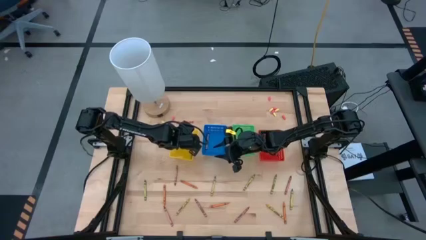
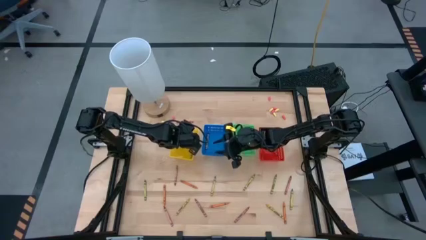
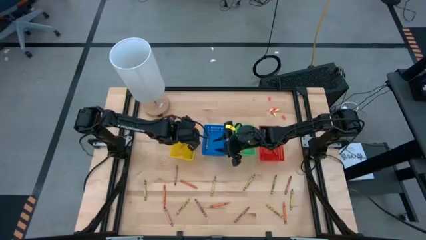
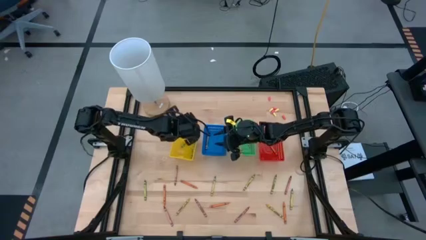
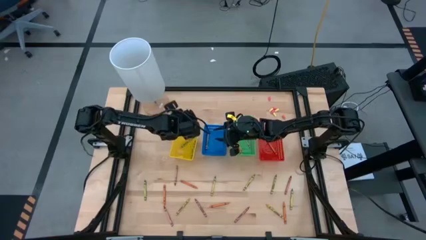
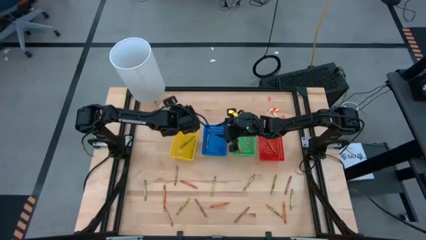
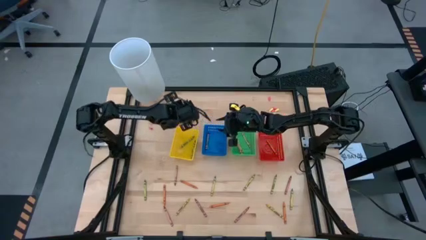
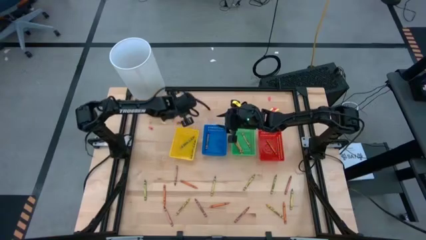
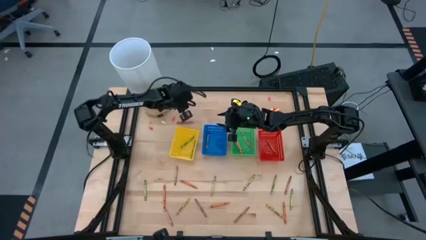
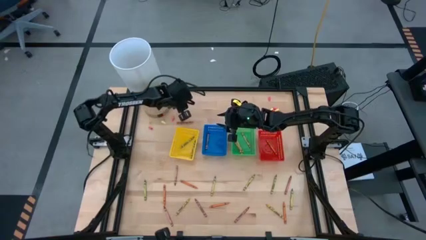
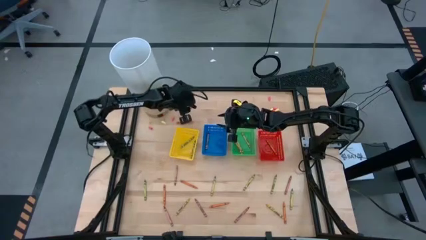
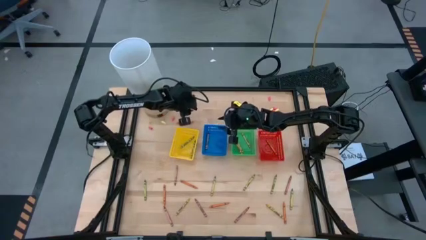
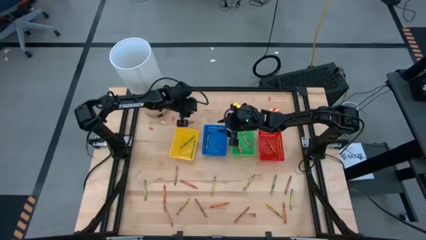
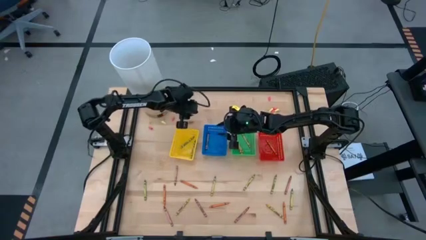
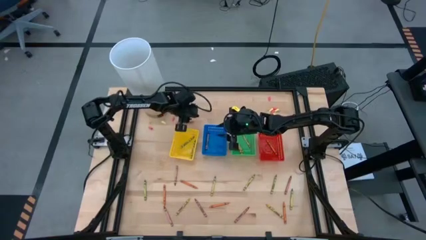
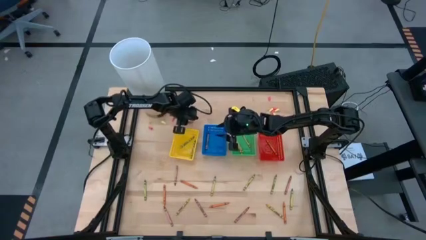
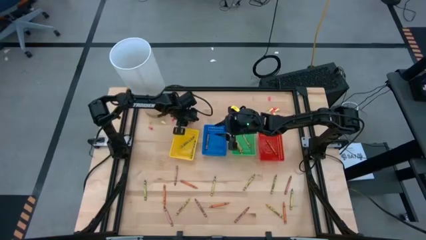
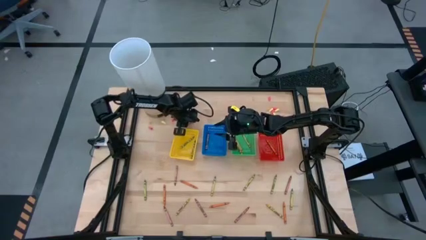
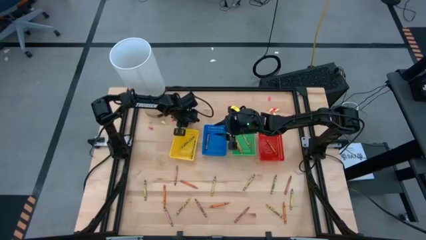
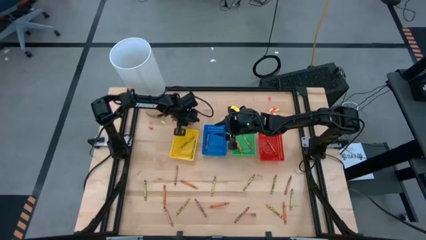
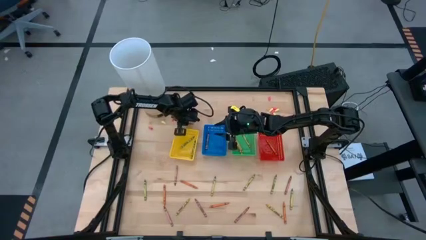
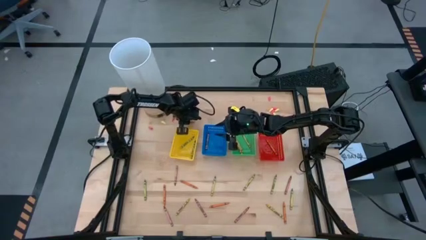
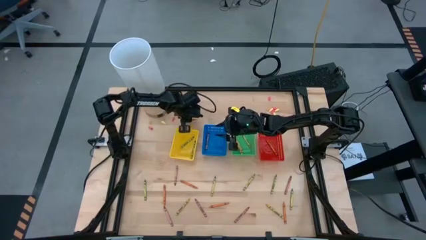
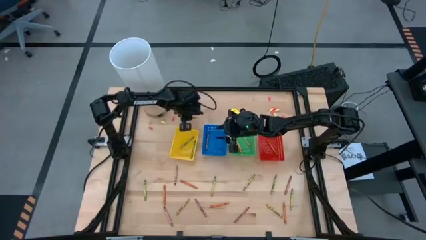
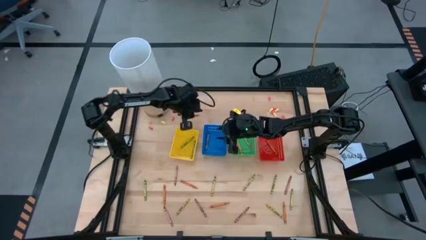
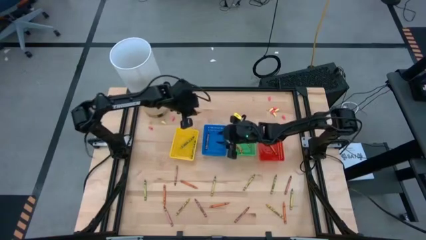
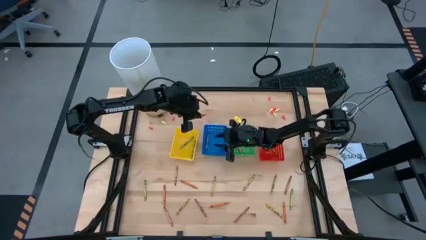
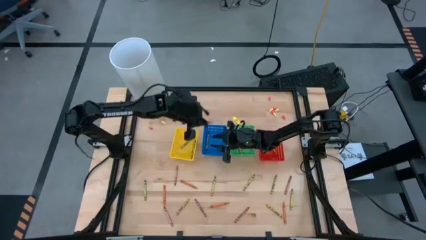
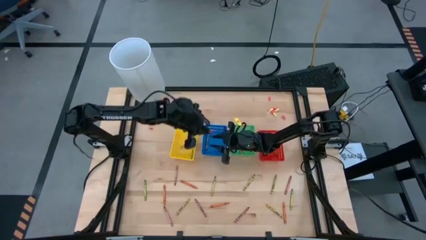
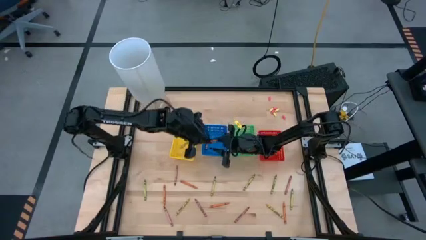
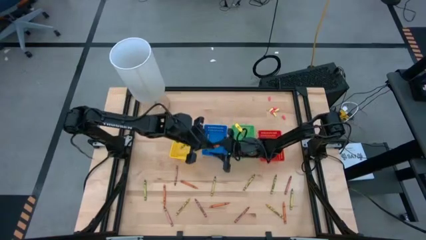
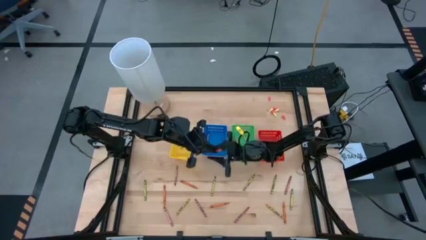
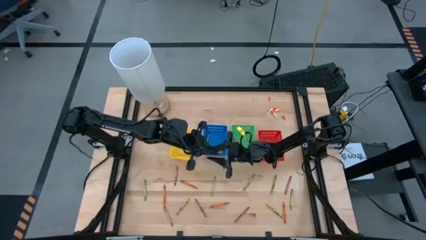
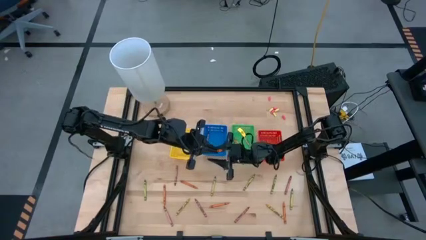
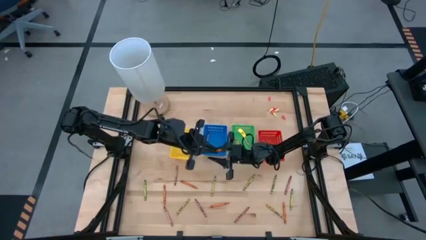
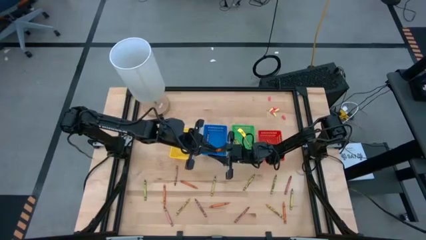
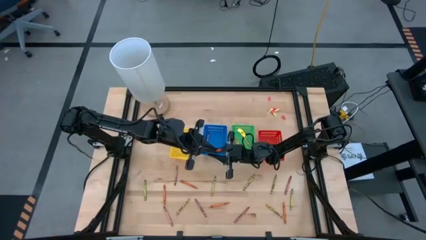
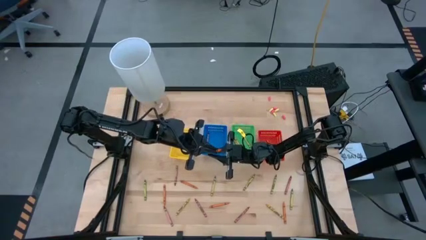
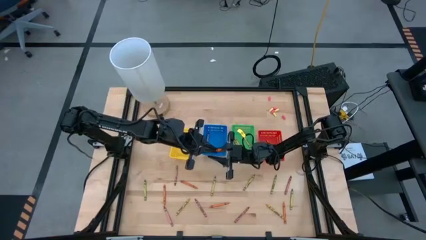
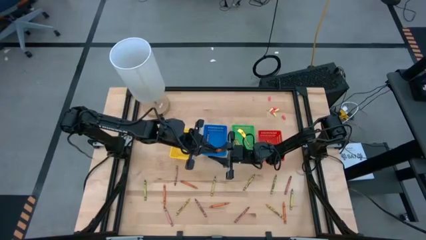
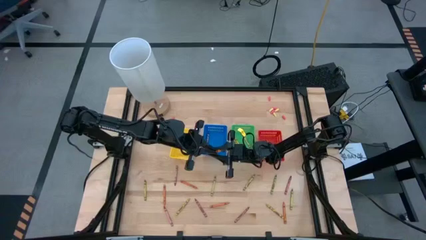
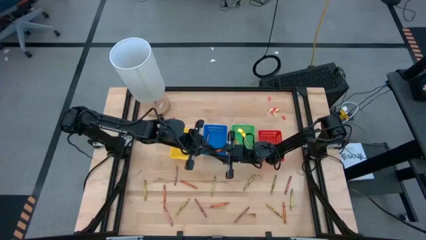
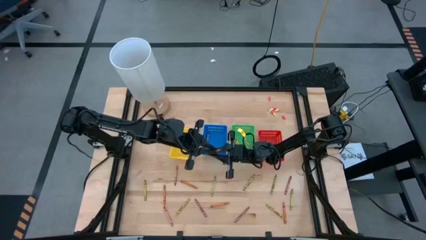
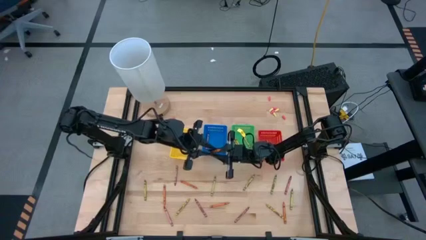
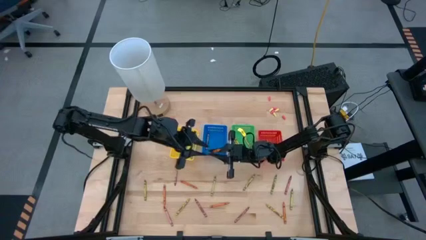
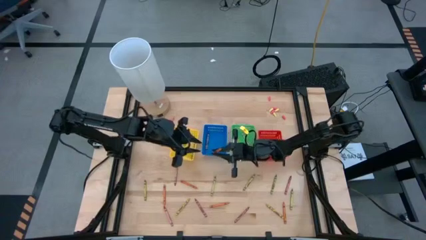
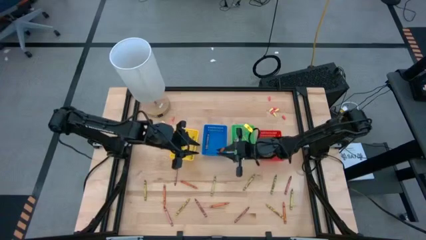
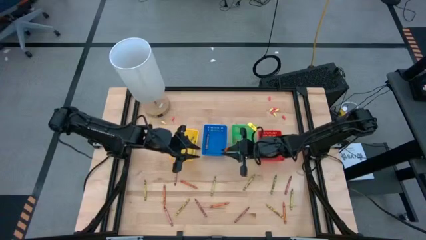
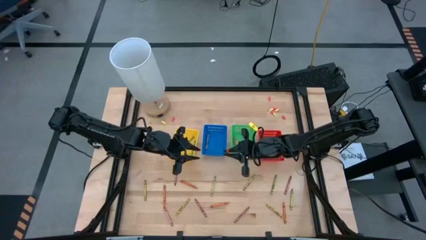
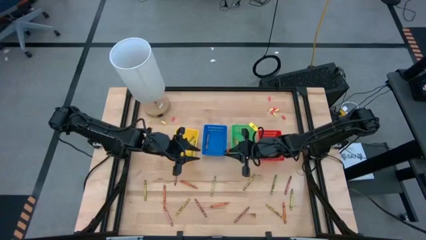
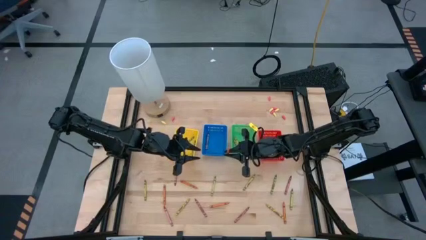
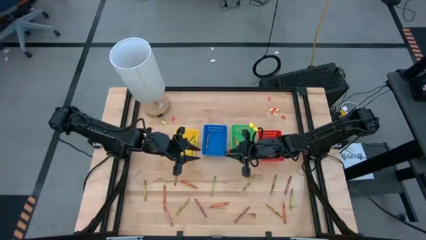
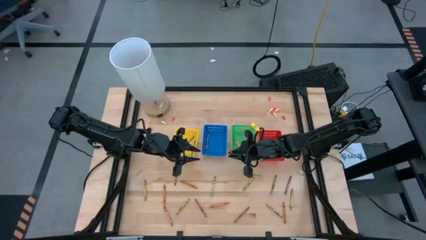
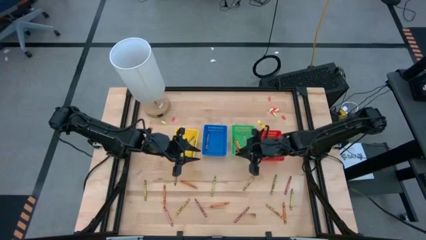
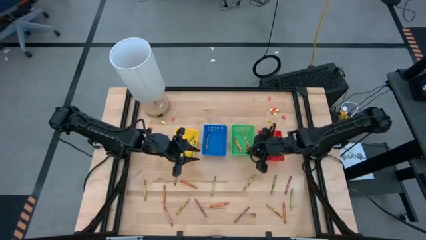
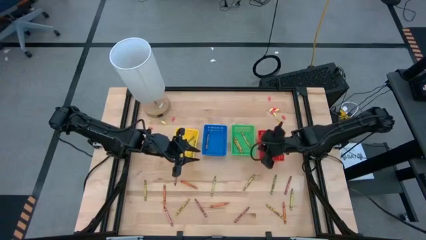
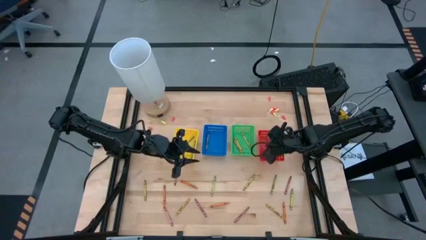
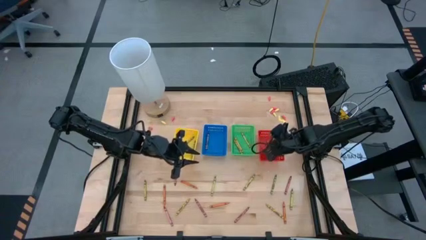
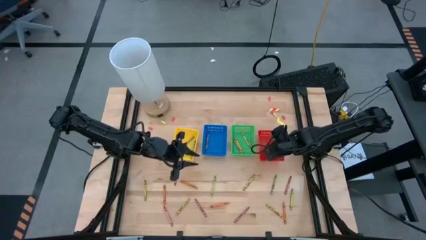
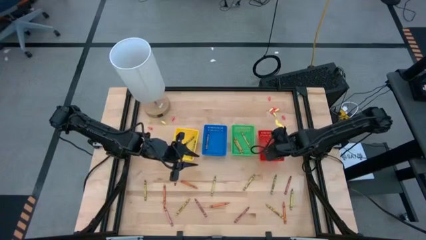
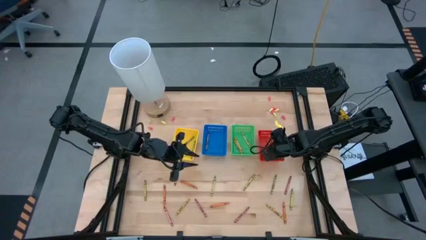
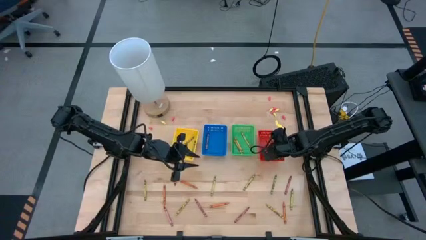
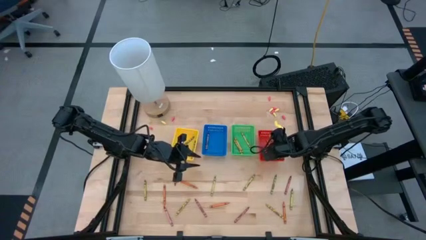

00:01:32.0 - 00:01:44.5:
Task: Sort crayons
Put the orange crayon into the red bin

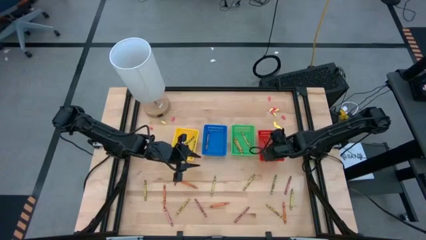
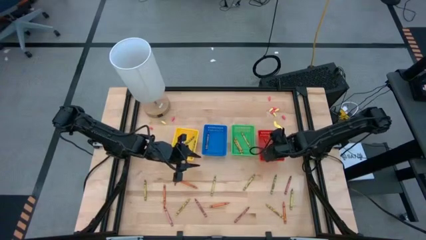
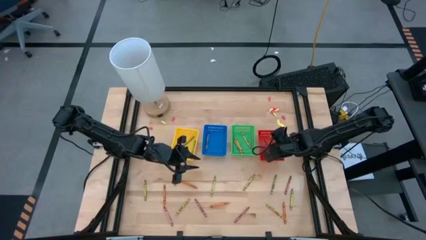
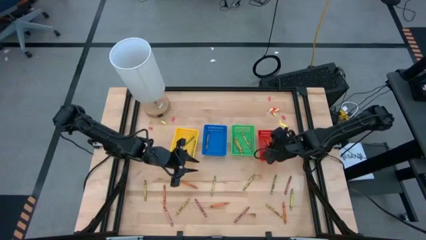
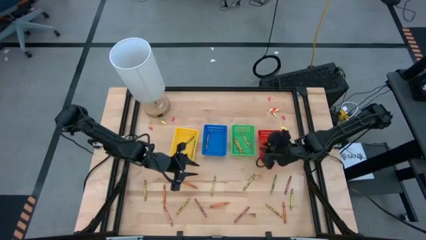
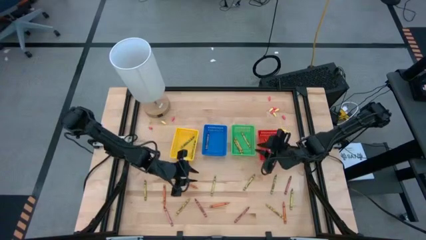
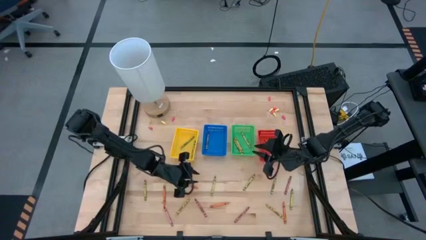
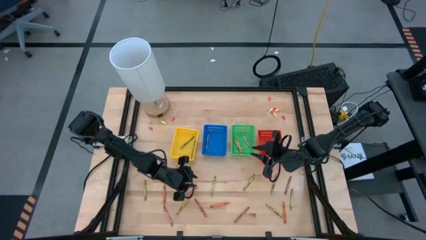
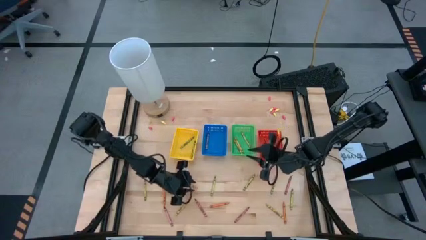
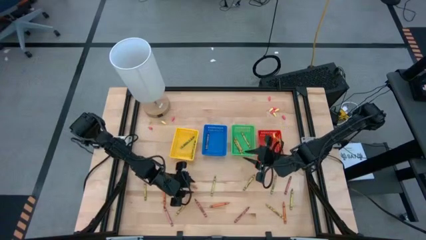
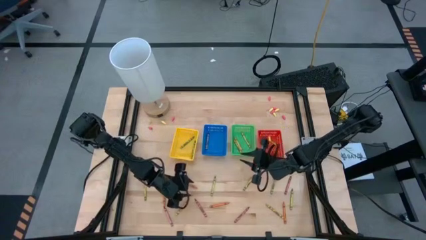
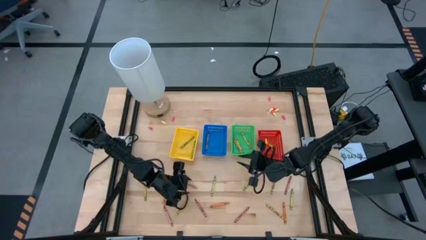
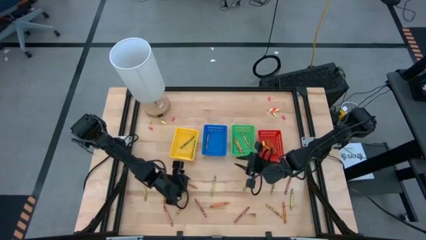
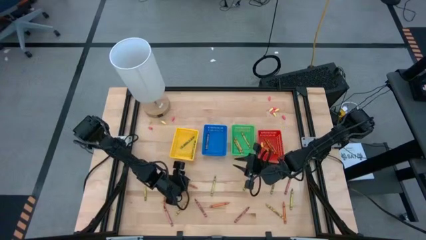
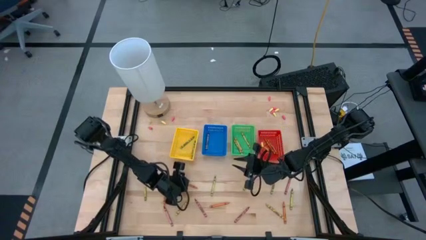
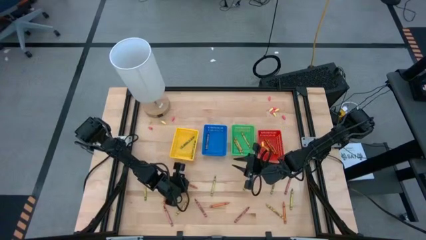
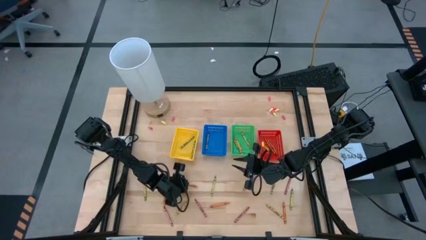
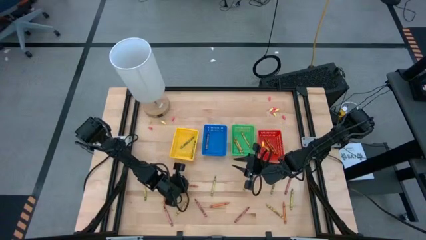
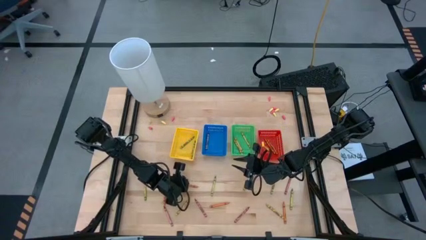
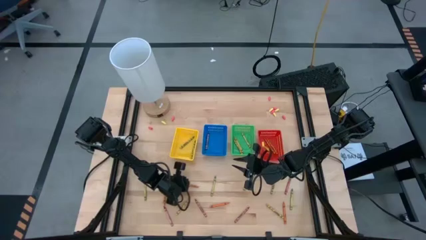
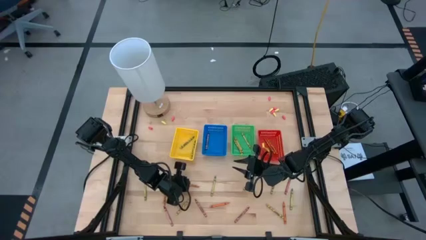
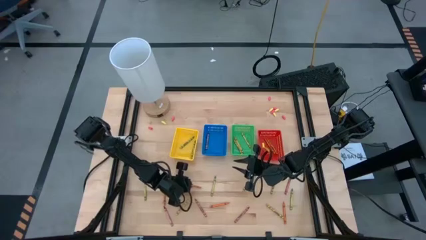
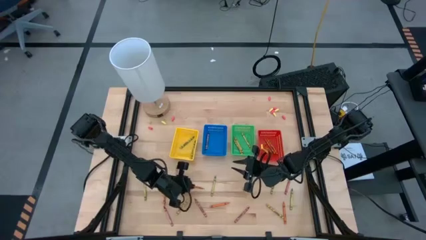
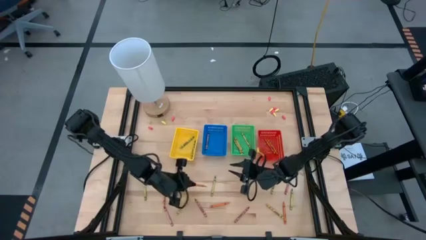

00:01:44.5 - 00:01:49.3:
Put the orange crayon into the red bin
